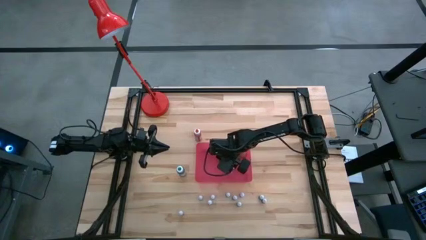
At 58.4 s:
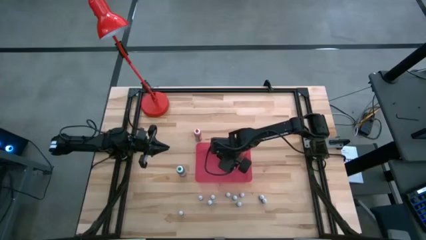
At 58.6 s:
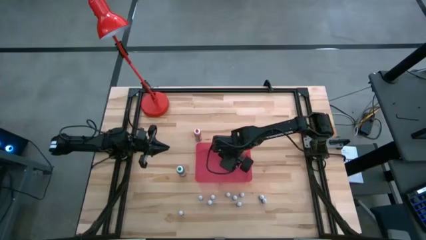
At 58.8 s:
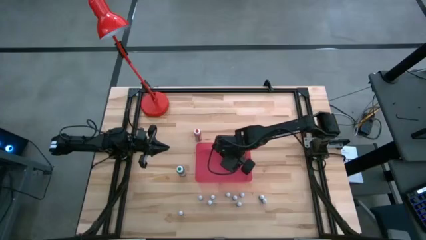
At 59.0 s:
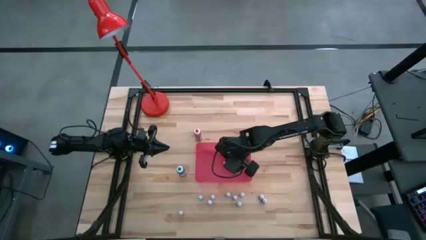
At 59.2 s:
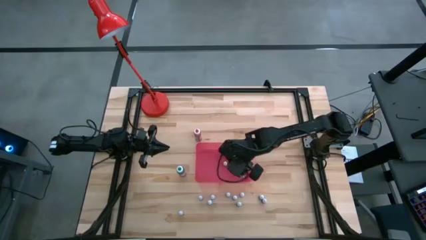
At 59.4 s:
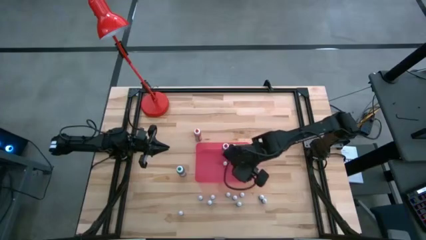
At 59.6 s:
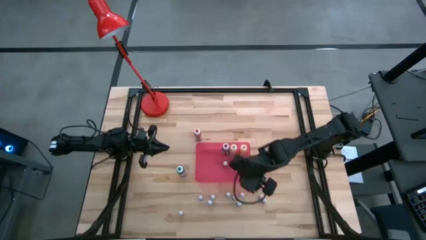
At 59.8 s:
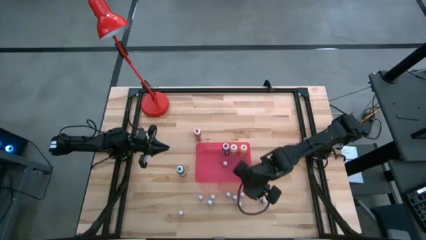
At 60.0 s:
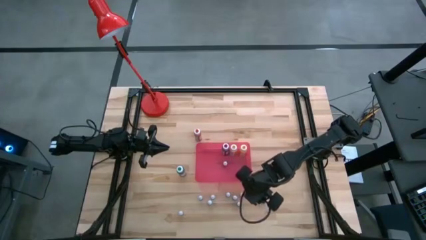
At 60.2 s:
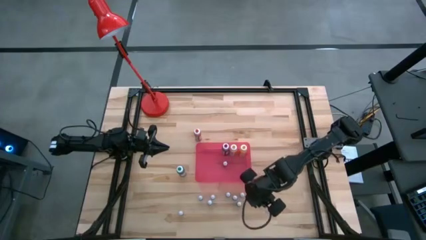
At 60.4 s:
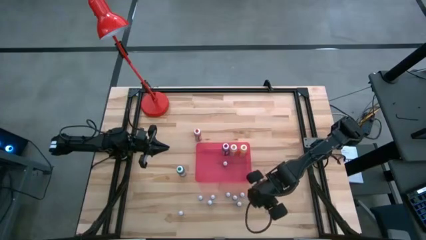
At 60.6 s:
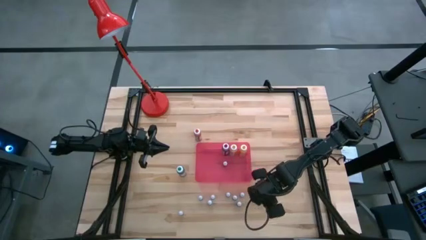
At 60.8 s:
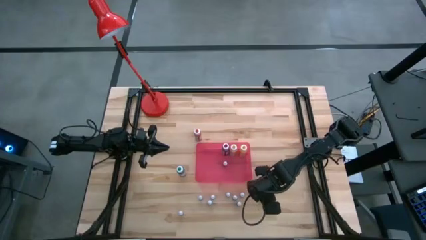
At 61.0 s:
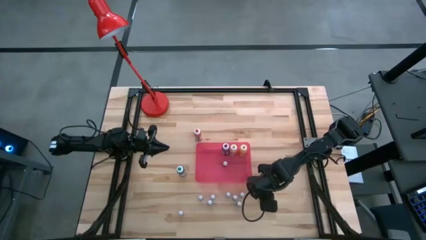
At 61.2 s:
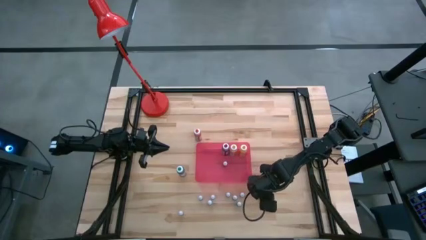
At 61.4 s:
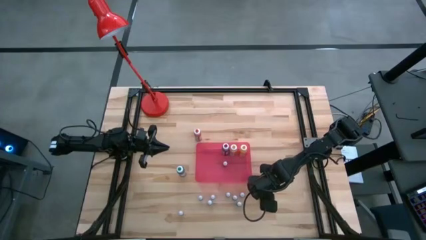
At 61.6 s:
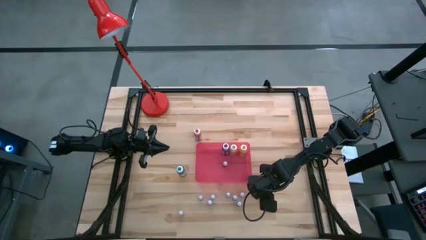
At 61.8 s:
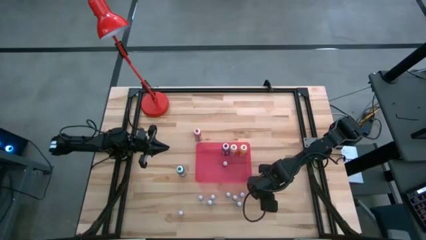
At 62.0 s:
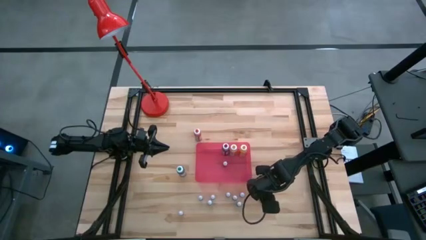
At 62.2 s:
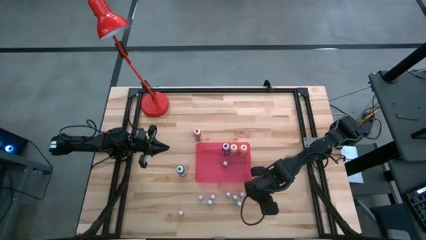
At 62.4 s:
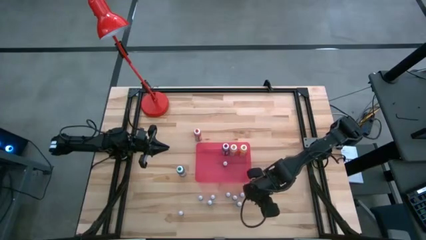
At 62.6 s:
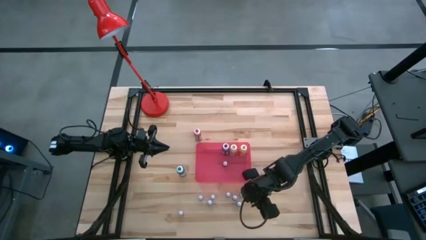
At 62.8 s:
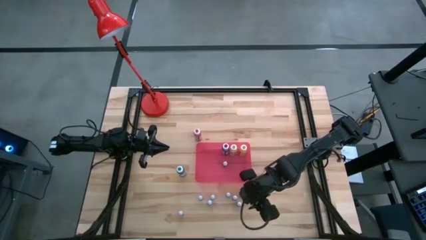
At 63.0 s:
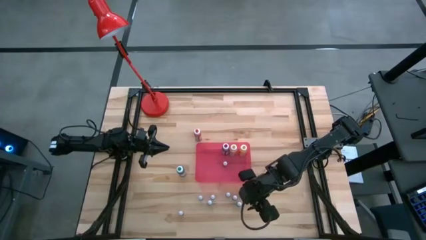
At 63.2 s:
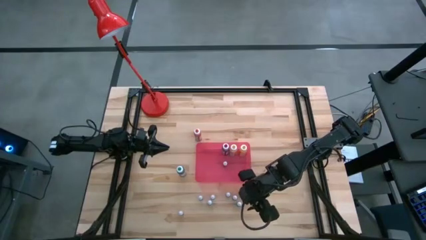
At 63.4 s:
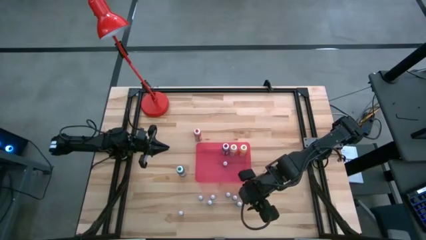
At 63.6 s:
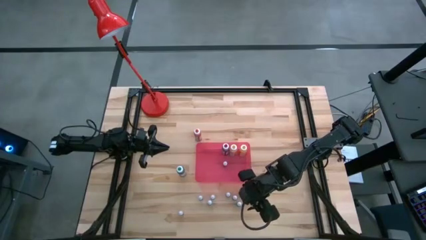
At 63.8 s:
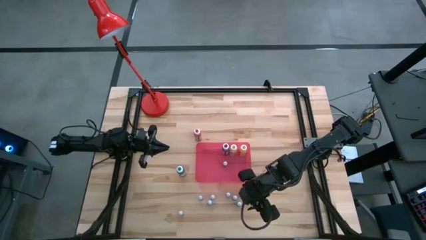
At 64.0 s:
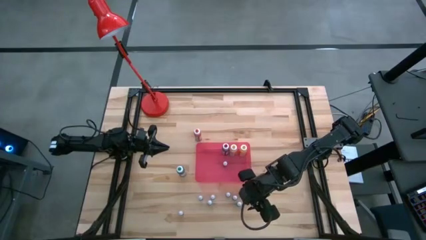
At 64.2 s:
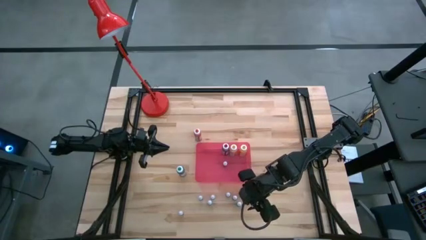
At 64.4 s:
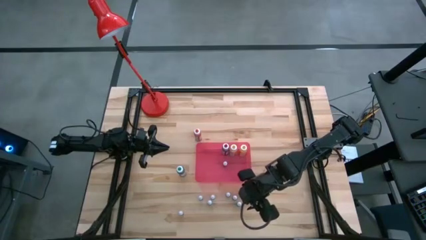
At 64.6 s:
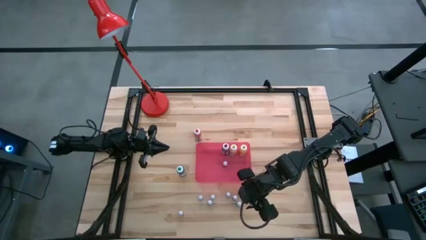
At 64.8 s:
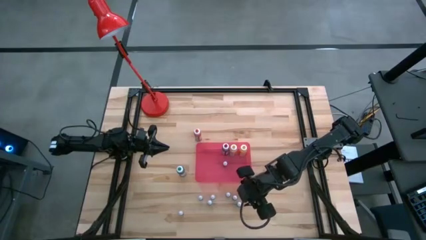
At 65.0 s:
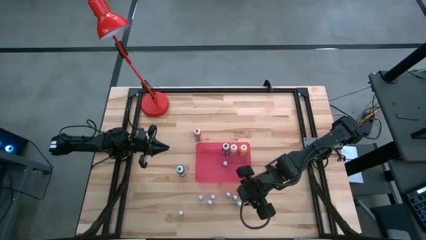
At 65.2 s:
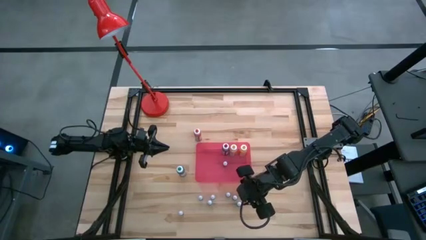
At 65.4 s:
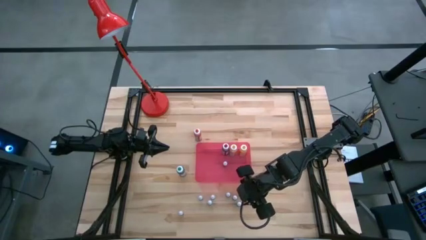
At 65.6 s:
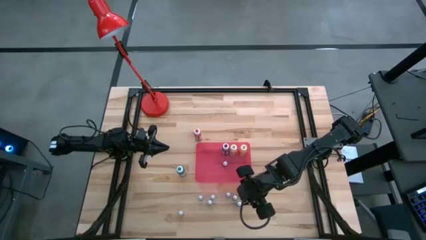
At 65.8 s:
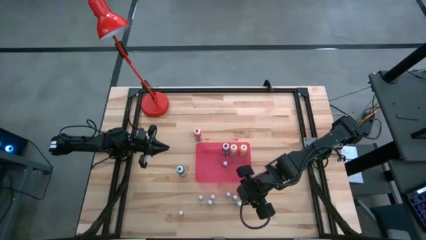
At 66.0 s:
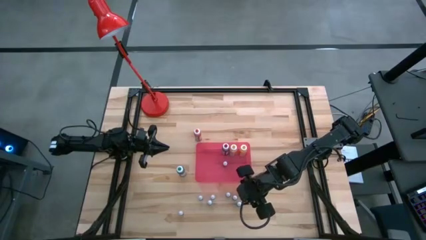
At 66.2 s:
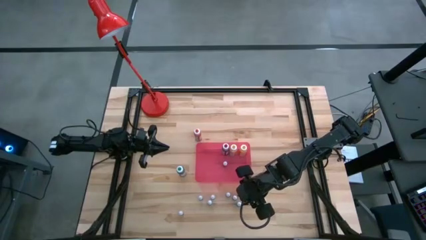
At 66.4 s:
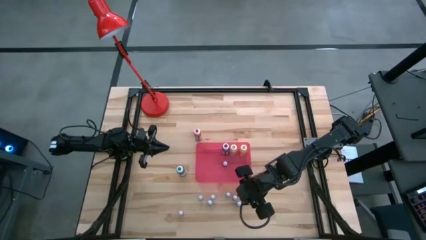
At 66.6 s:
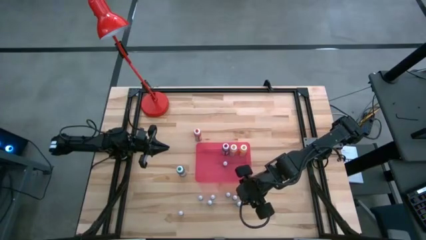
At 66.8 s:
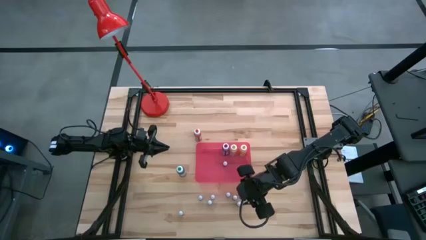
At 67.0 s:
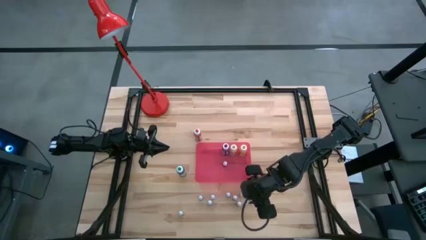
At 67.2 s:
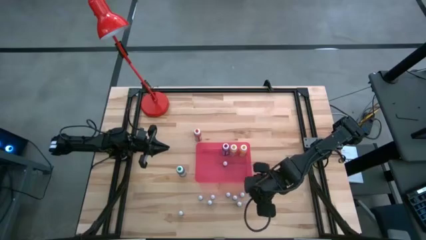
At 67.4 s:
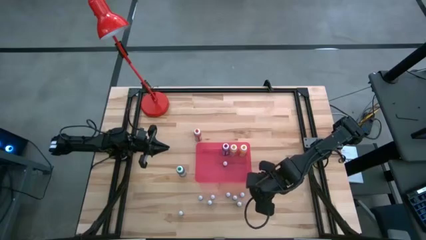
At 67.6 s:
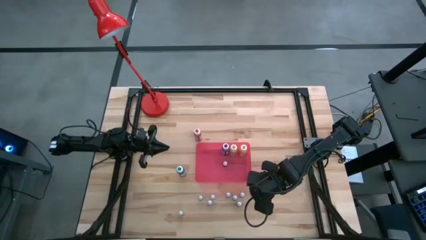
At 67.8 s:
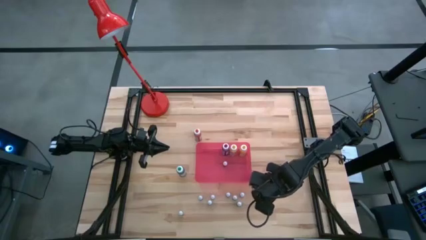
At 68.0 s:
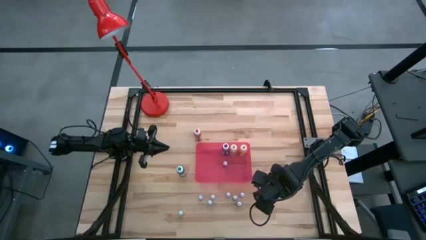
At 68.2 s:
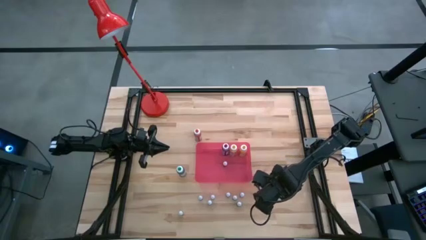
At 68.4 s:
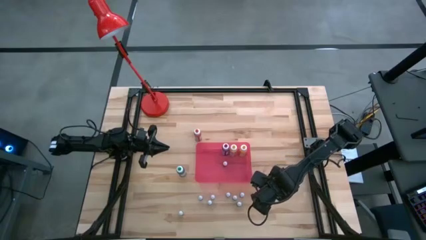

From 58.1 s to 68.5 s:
Task: Pick & Place food coloring
Put the small green food coloring bottle into the container

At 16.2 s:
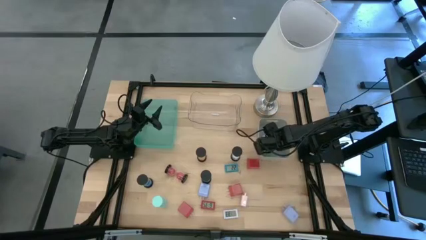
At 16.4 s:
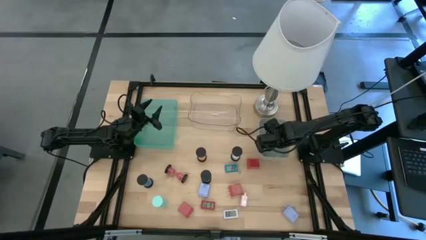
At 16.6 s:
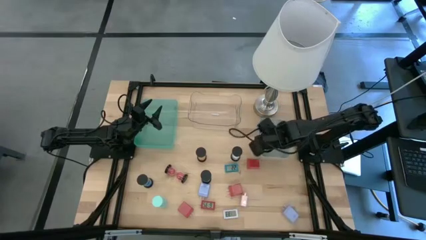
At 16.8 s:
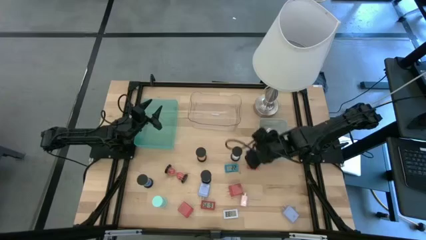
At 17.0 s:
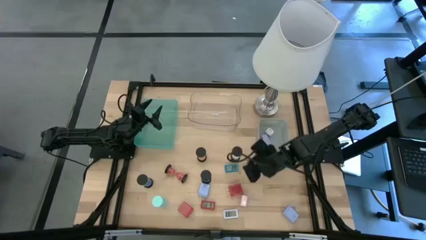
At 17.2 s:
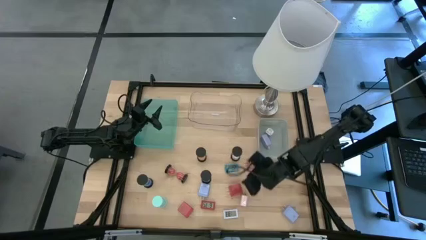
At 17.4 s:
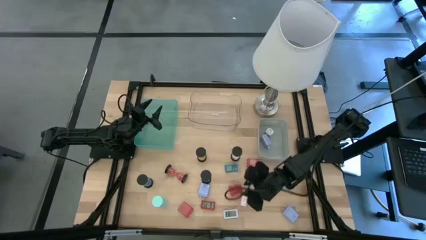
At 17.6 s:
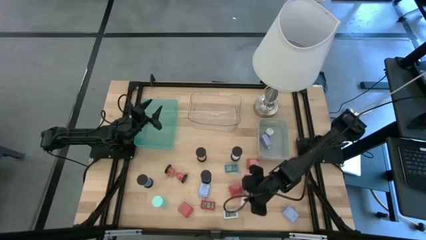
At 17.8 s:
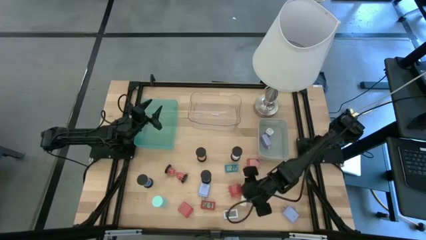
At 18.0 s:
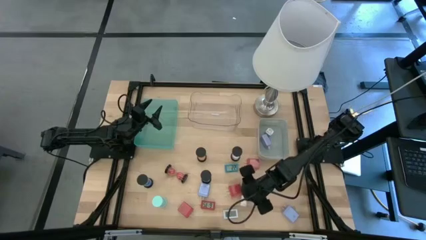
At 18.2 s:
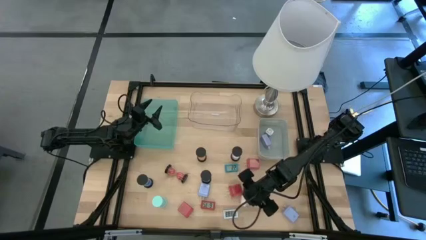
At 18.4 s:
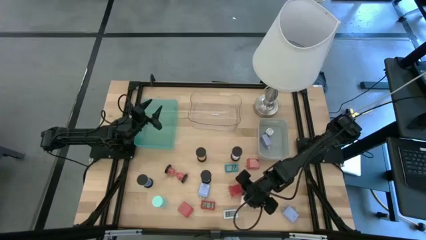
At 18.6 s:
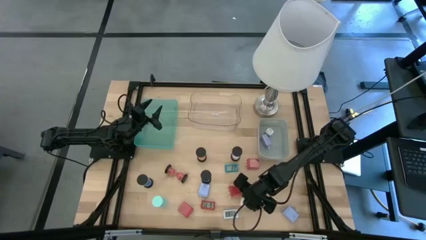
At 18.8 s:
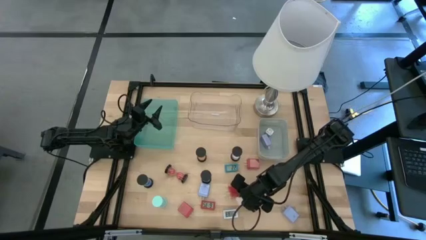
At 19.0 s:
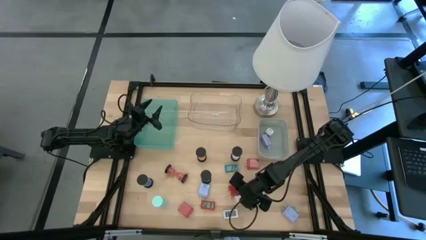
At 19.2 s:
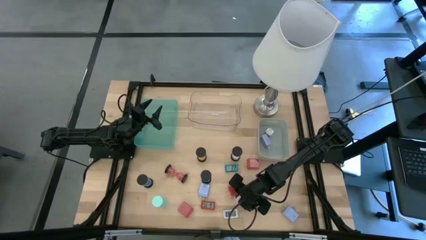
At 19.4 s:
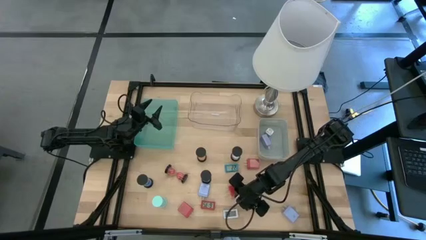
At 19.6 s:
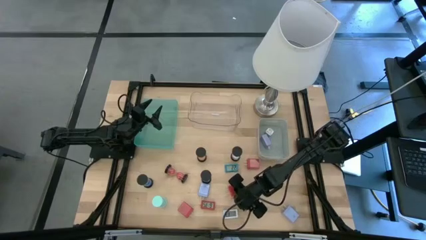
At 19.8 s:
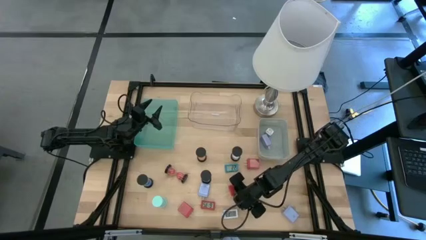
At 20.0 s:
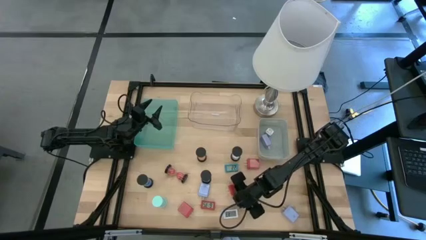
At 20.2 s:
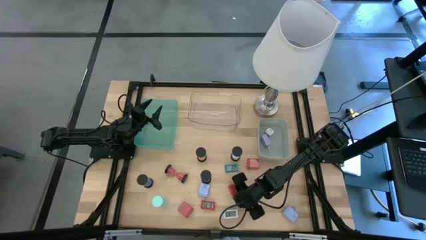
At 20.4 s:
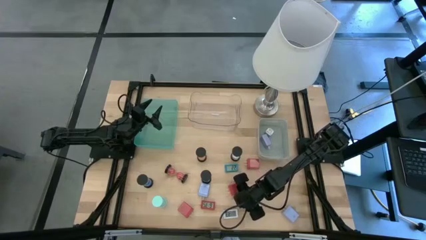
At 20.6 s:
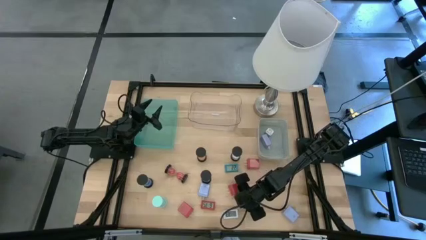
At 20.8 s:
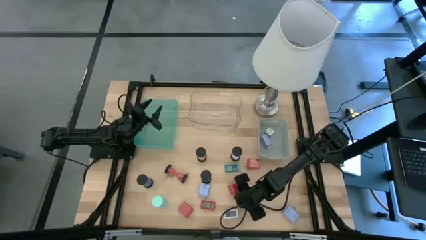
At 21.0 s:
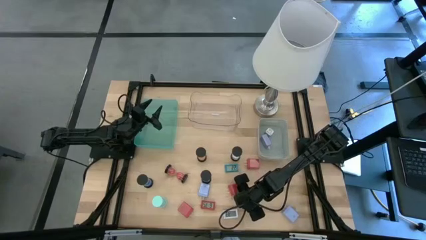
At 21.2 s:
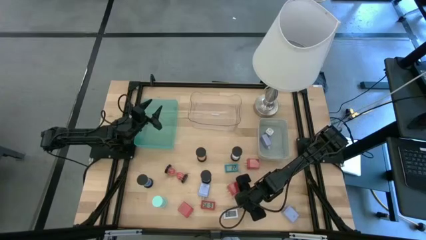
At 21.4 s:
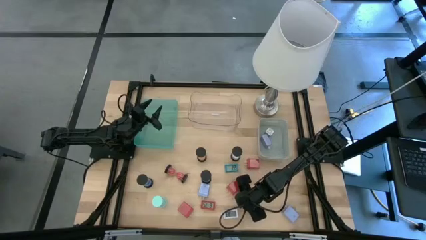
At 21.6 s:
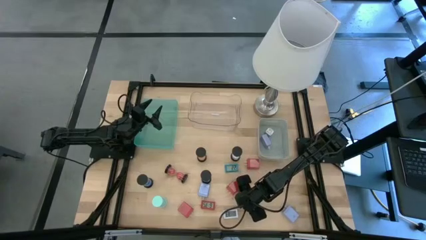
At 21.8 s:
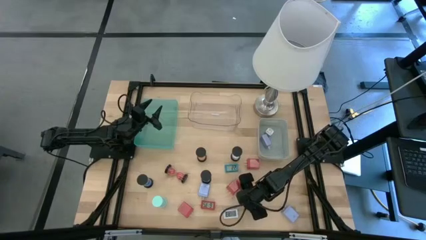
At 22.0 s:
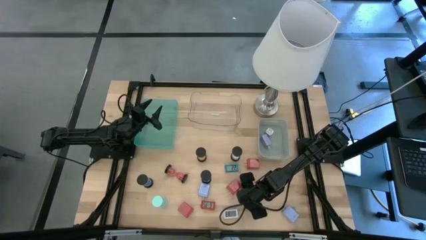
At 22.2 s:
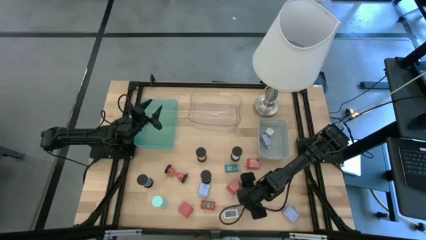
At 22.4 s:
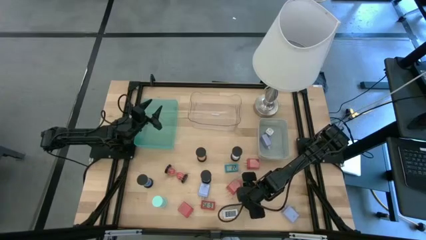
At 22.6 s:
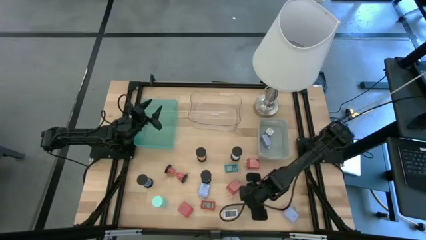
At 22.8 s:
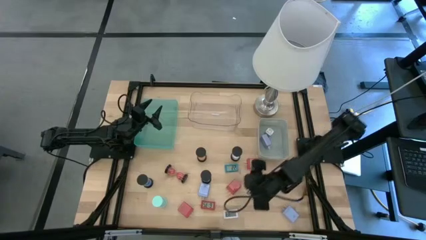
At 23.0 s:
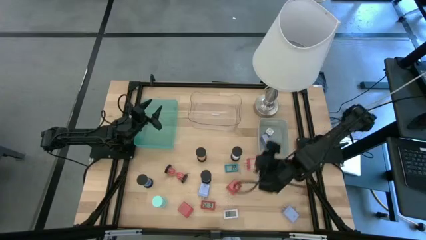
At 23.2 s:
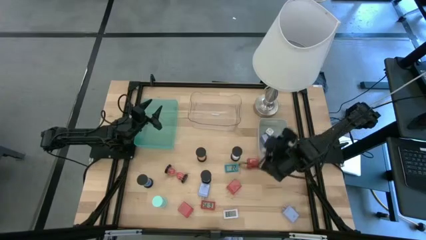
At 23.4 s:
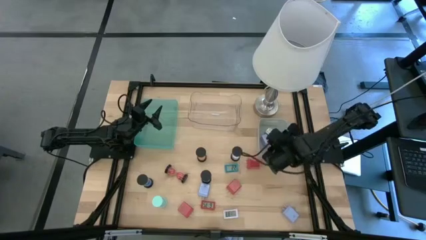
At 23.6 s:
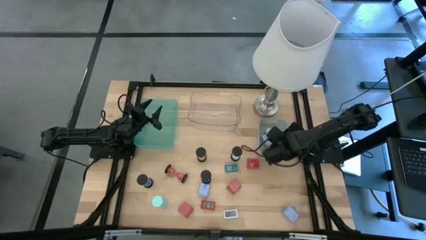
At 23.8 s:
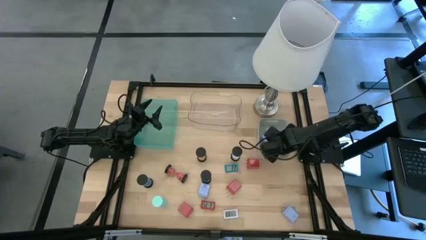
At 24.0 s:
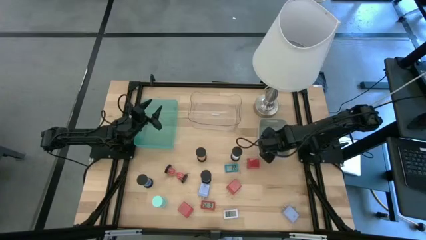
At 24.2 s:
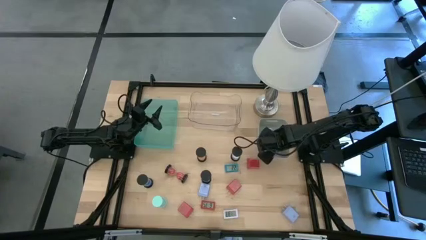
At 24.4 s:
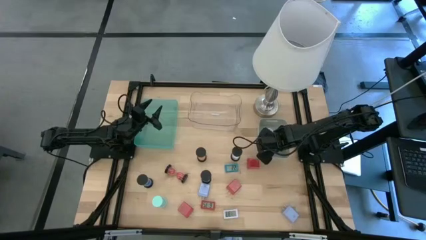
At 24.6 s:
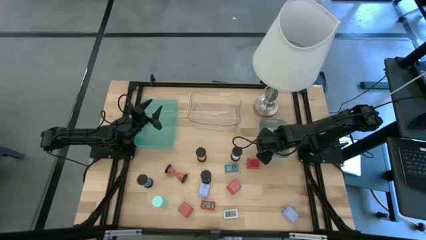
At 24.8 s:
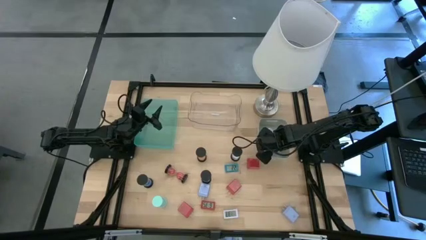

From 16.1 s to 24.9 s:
Task: Pick & Place Office items
Put the pink charger adapter into the gray bin
